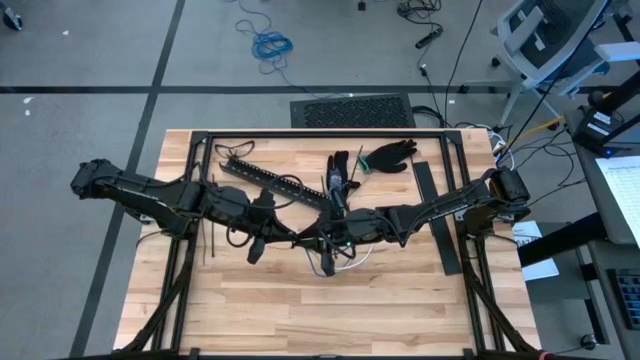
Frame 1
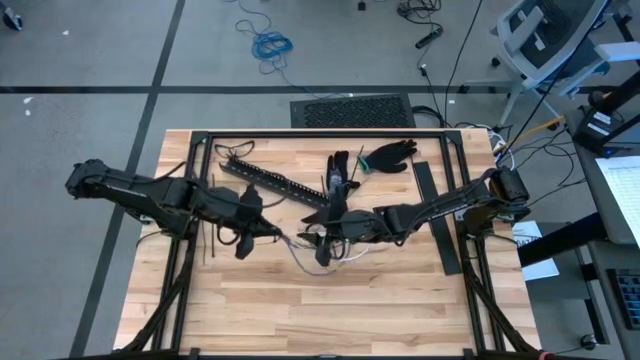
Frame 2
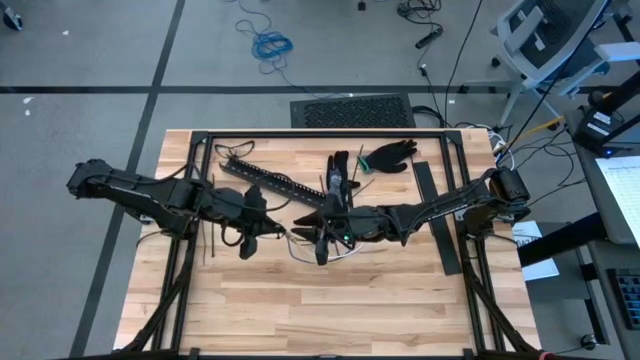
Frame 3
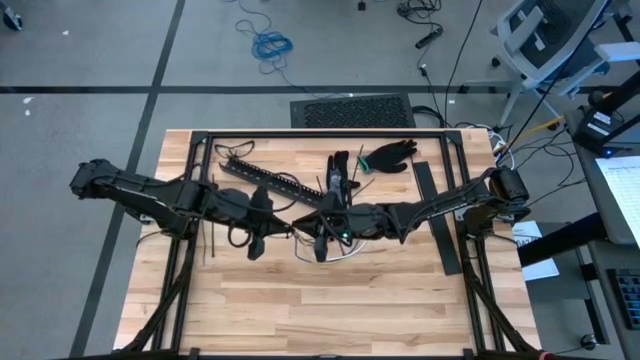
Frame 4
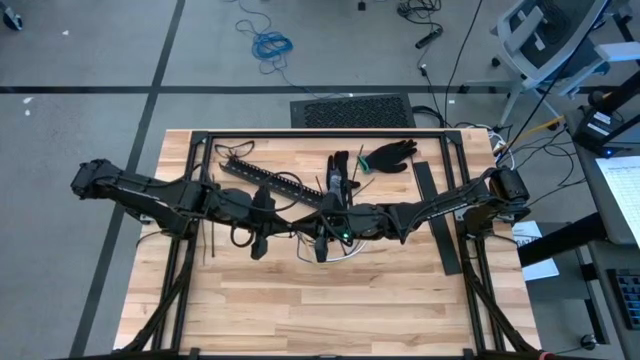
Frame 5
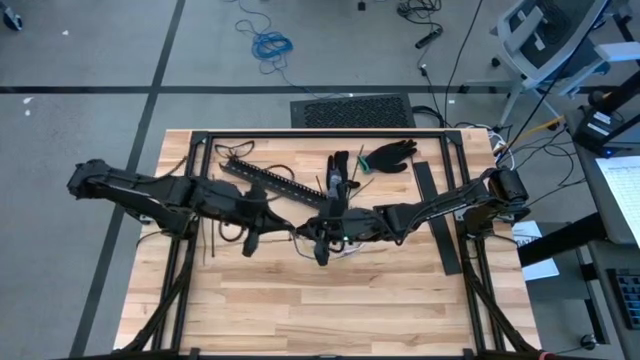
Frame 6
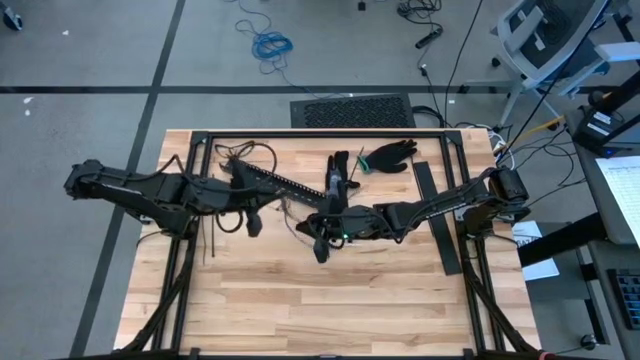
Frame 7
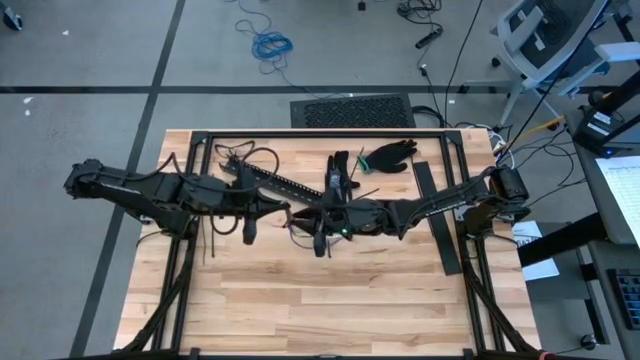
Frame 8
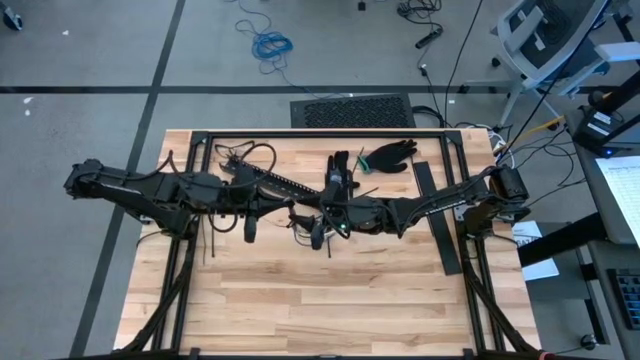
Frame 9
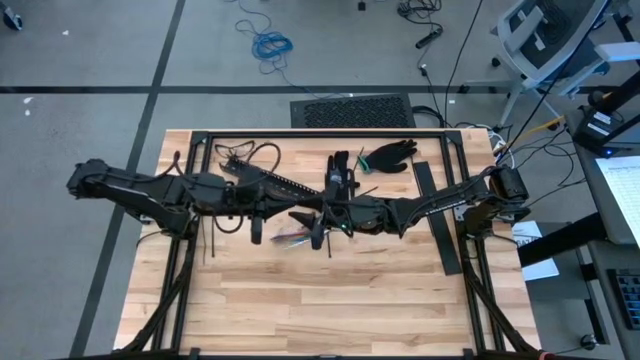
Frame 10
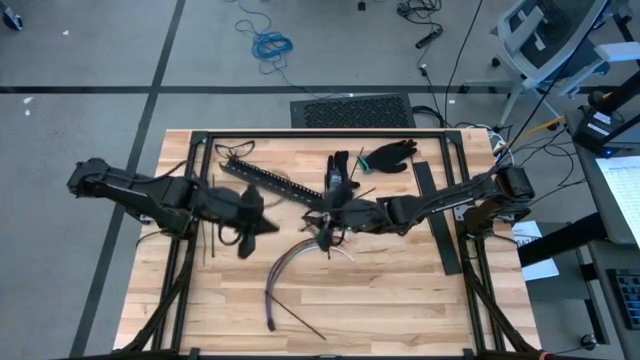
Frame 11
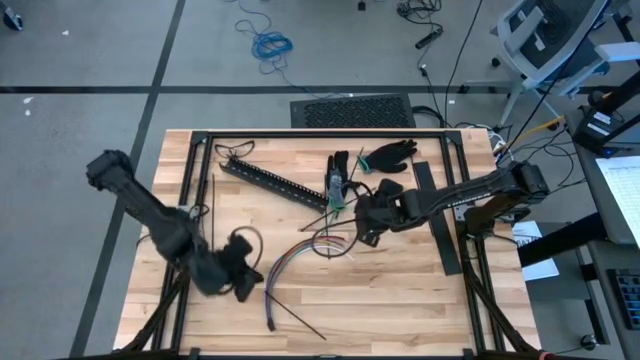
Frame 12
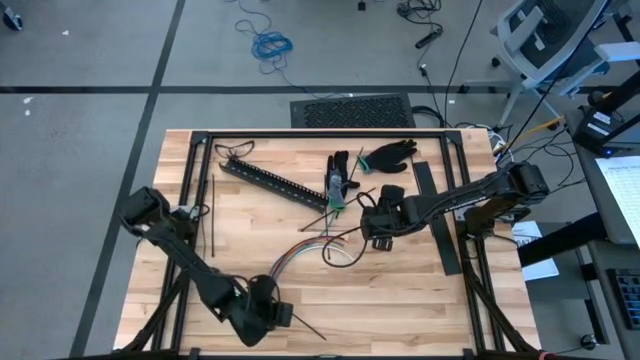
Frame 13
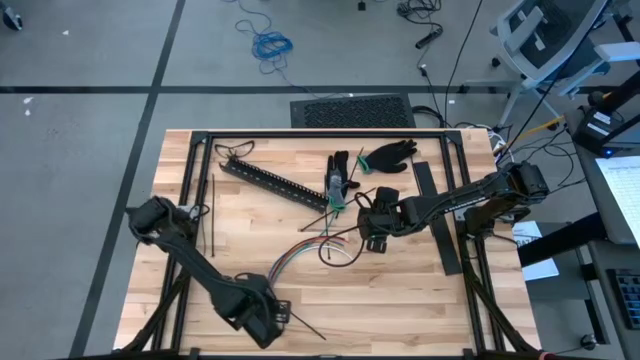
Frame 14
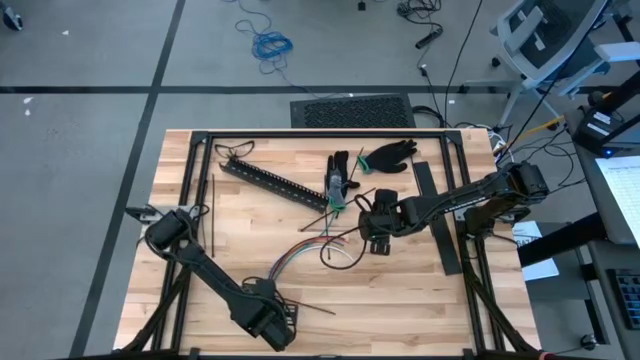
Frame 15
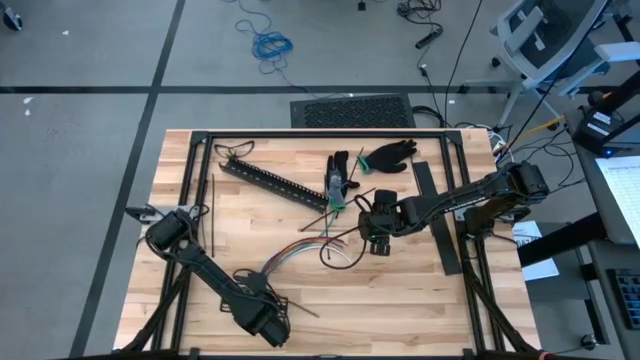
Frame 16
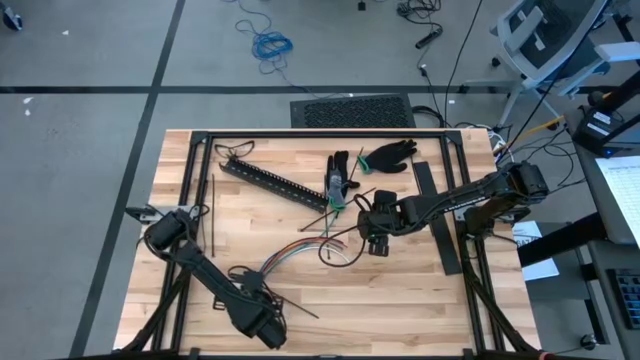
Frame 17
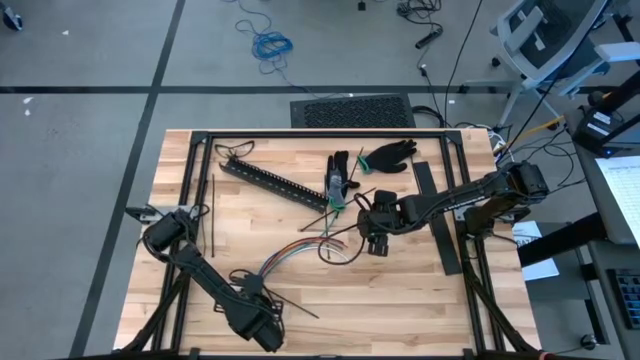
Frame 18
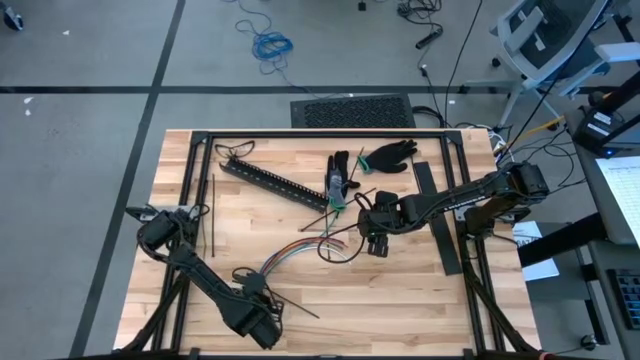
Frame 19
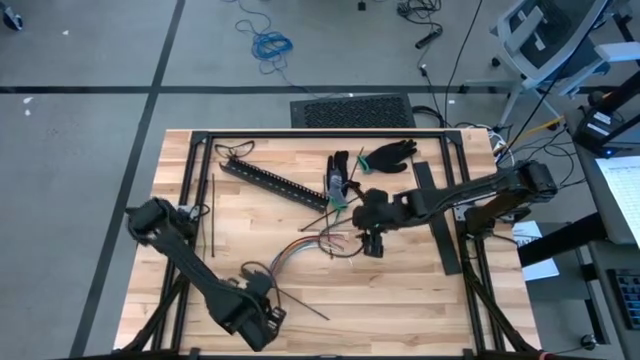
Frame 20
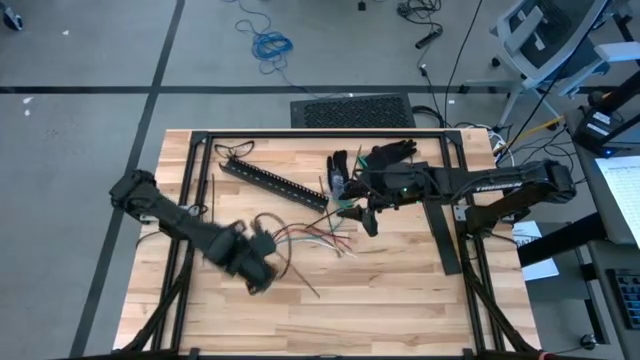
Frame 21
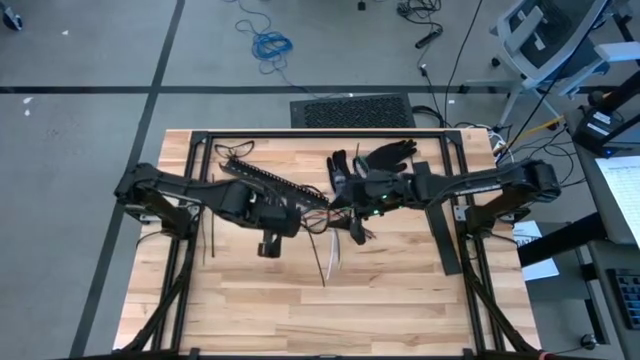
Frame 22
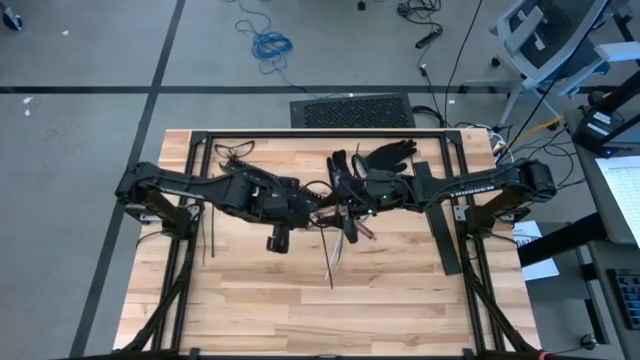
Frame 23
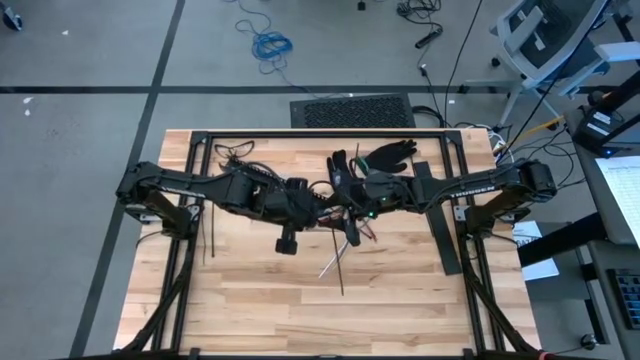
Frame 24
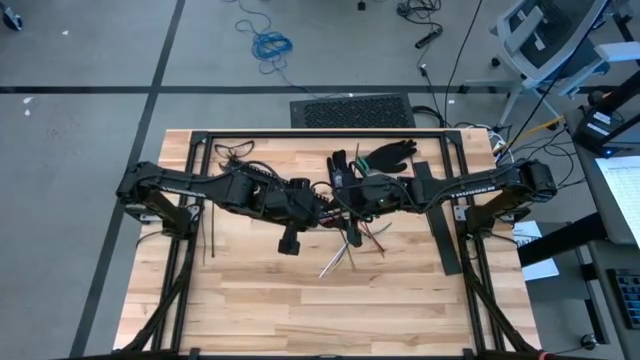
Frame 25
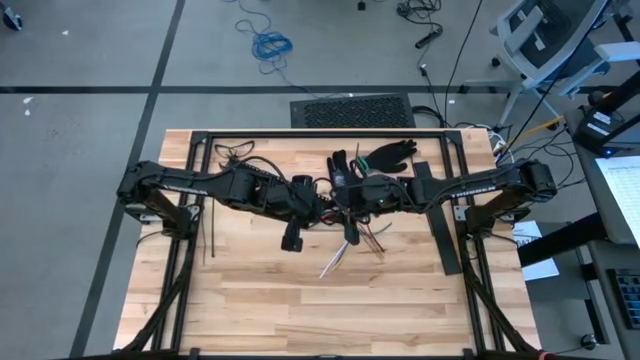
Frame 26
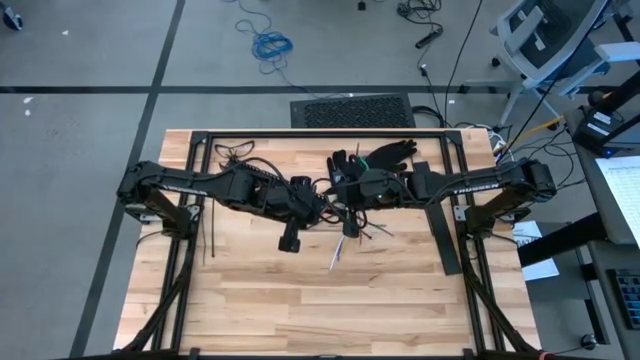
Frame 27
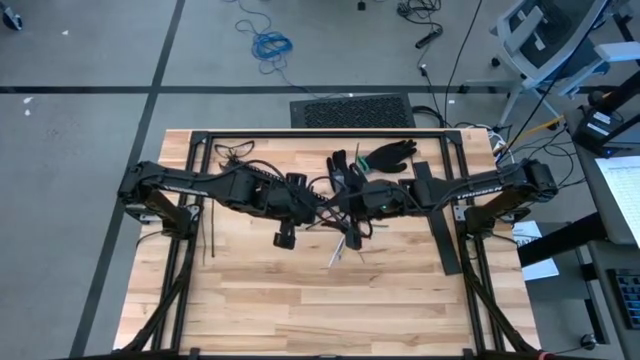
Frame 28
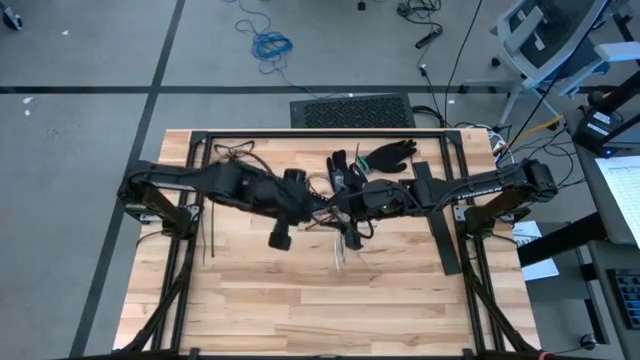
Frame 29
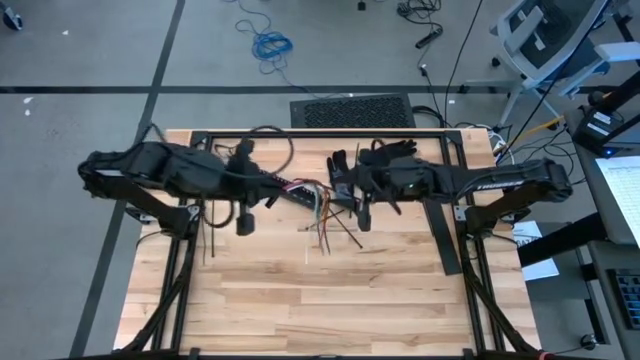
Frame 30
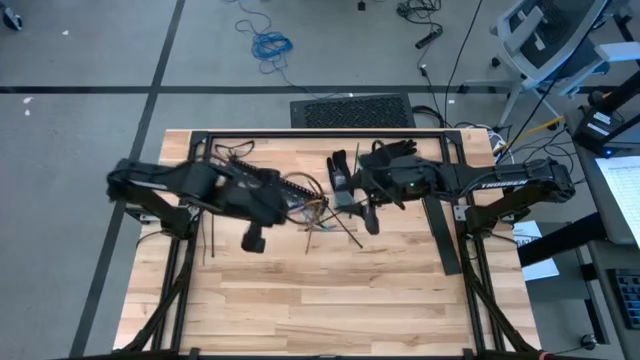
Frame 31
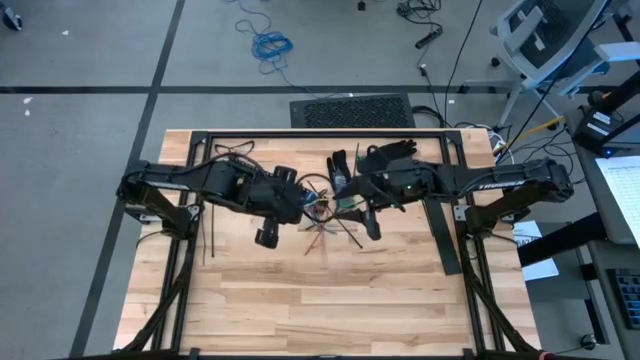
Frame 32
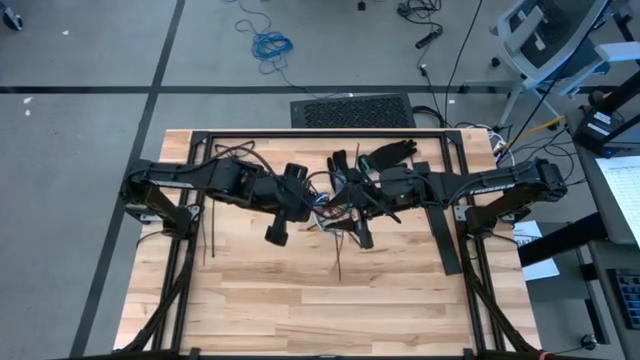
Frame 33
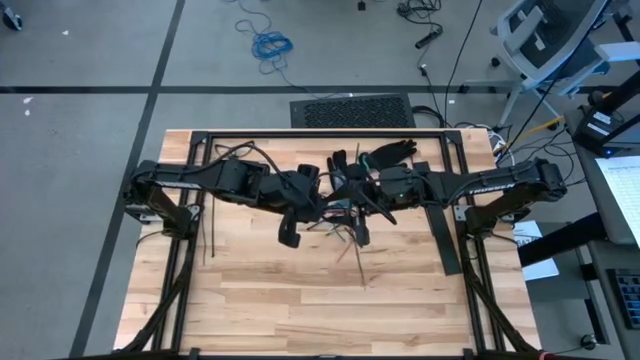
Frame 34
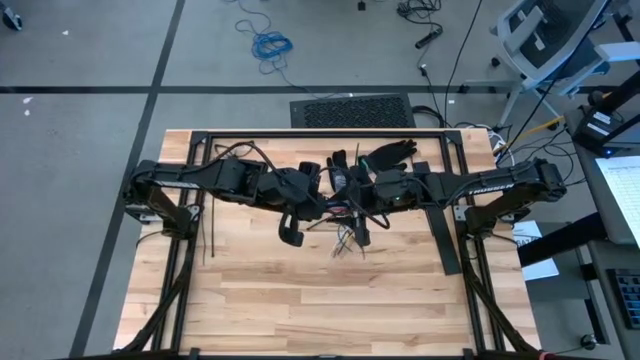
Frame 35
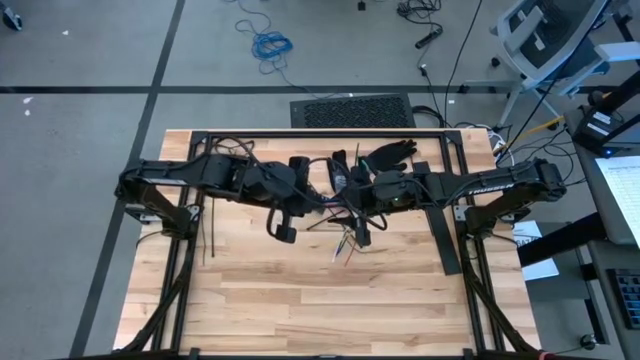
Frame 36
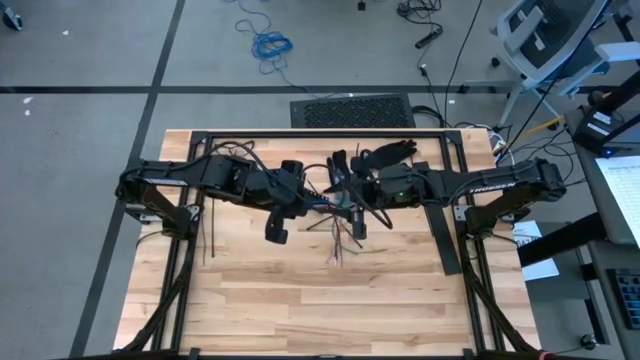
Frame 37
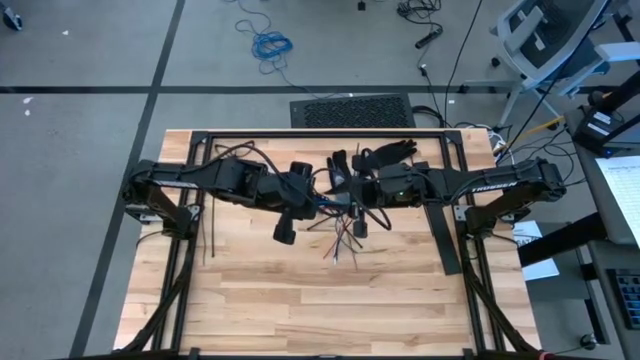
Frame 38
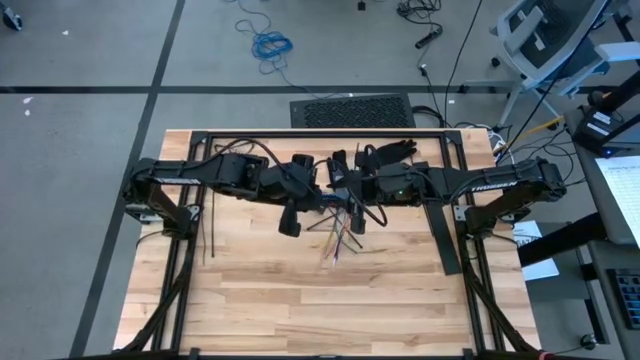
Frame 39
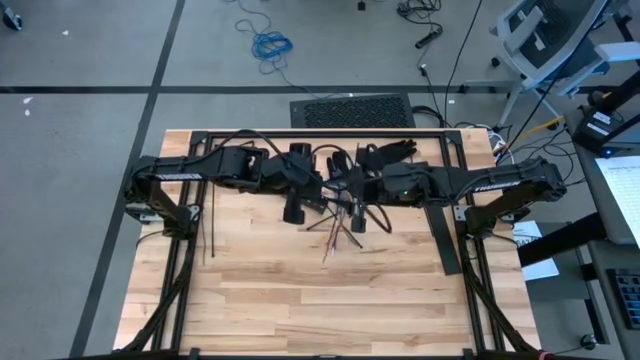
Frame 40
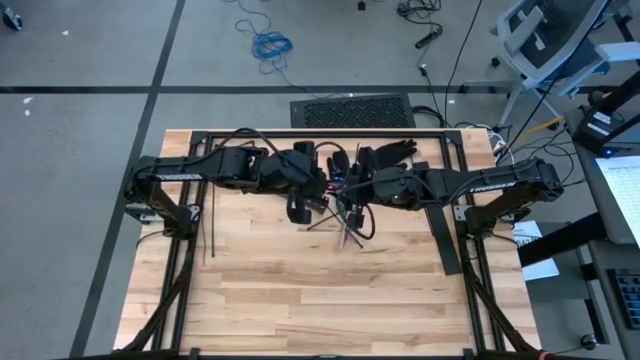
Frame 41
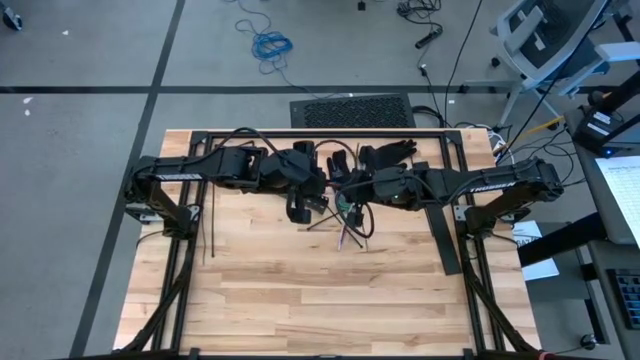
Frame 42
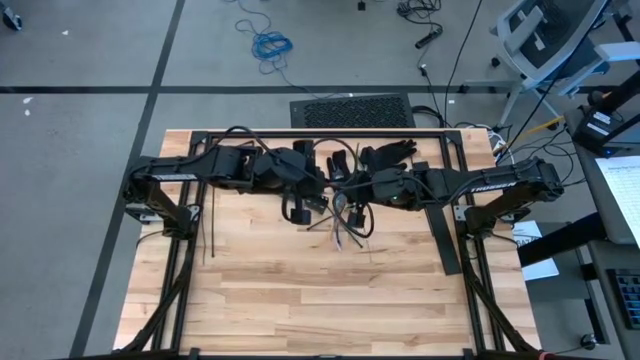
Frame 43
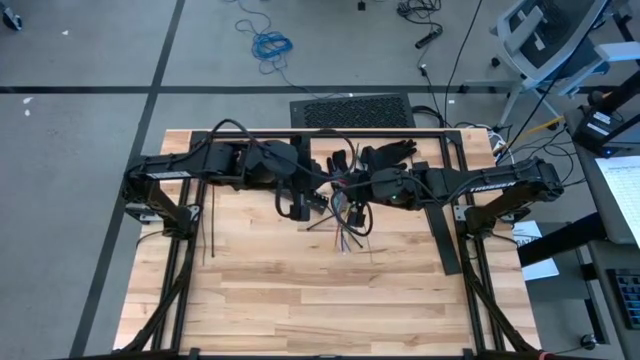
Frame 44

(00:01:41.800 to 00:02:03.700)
Task: Ziptie cables
Wrap the cable wires with the black zip tie
